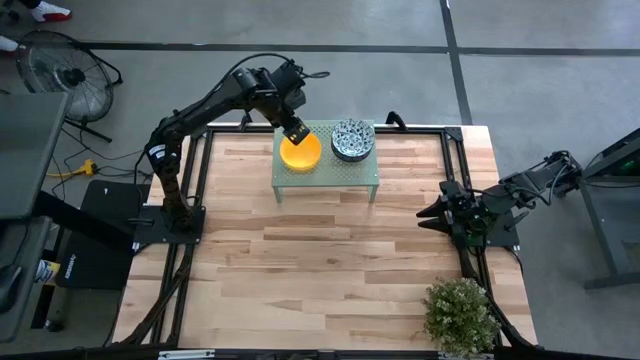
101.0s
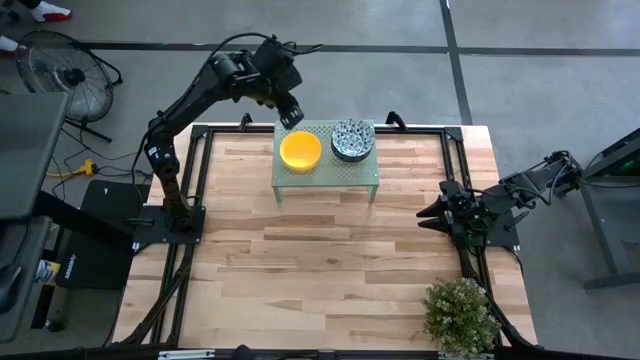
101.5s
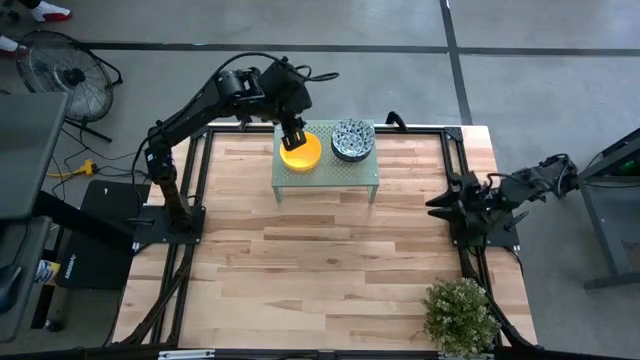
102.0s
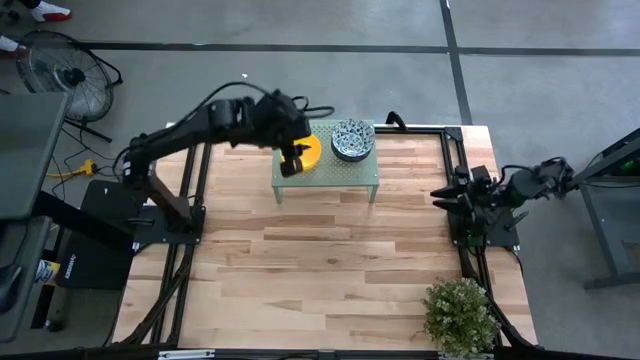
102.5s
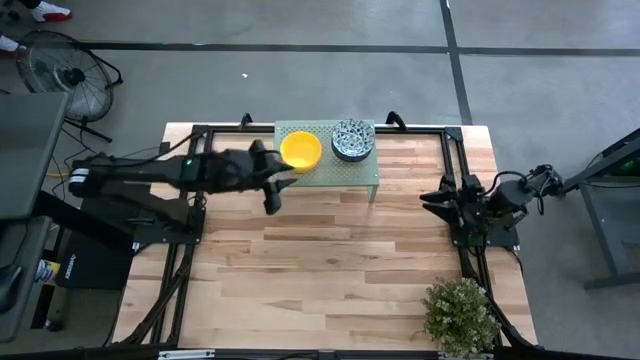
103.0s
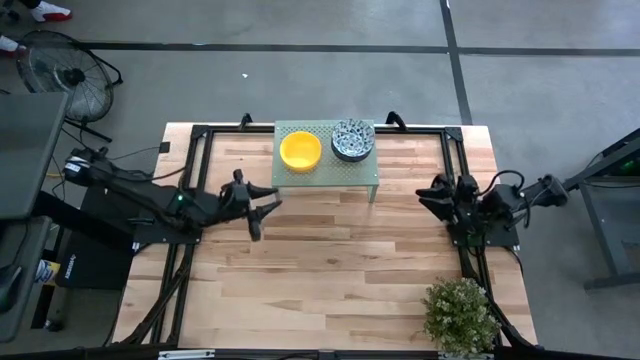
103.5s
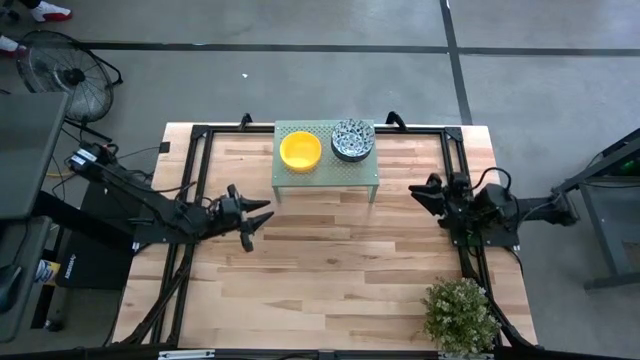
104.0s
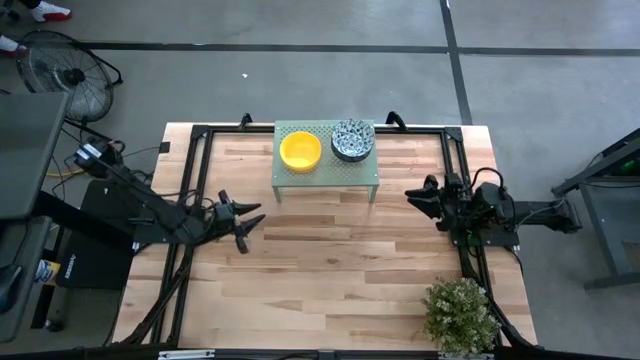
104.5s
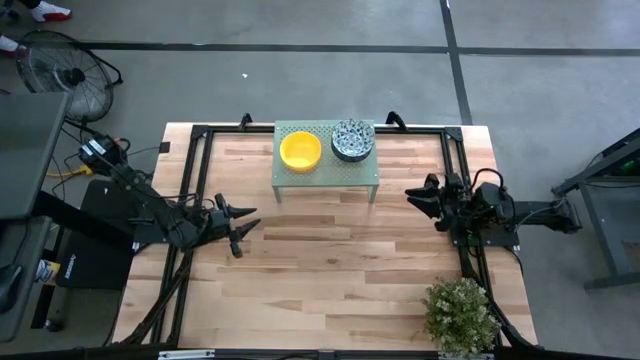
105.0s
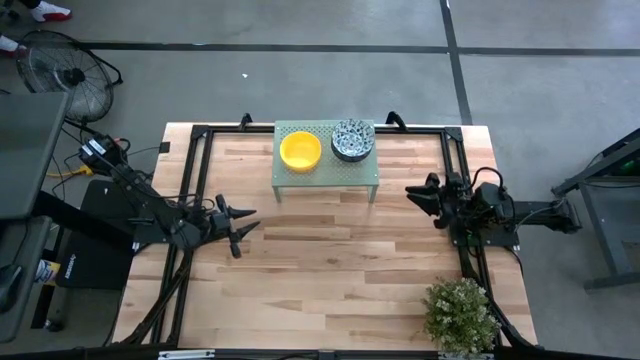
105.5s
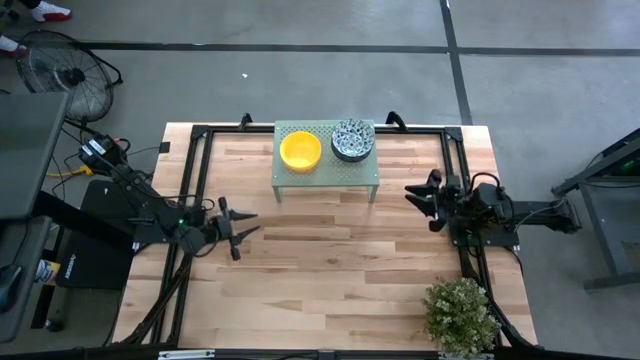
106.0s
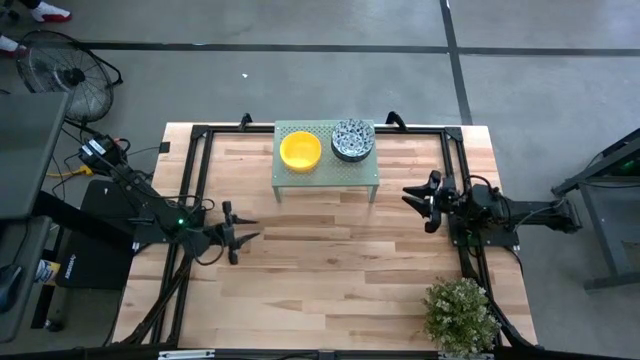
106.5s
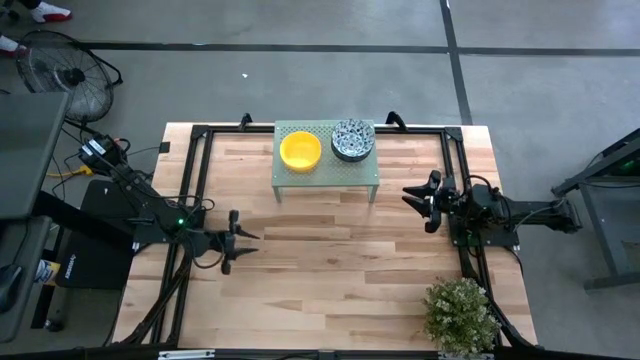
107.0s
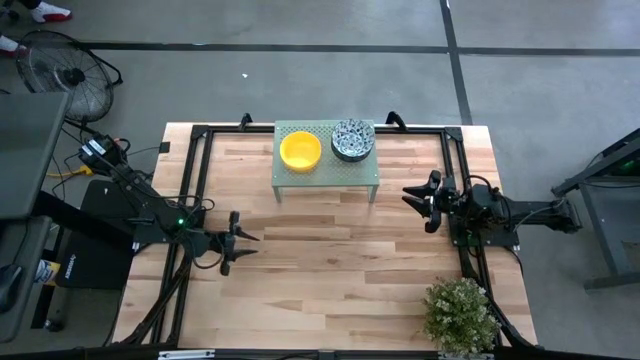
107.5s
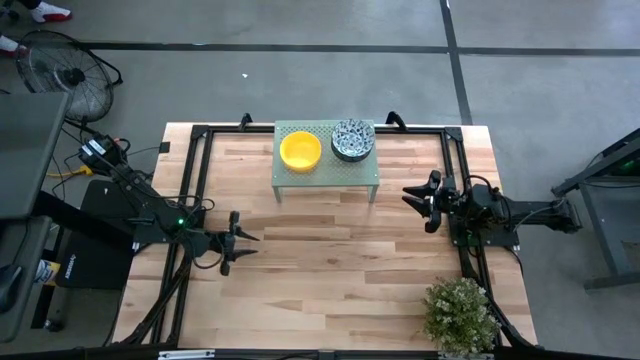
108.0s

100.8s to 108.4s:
Task: Pick & Place Mini bowls
Return to Home Position

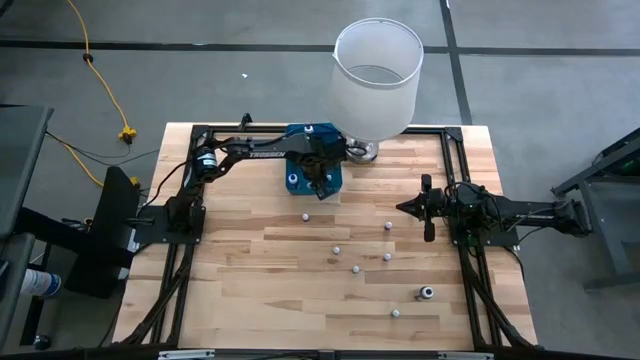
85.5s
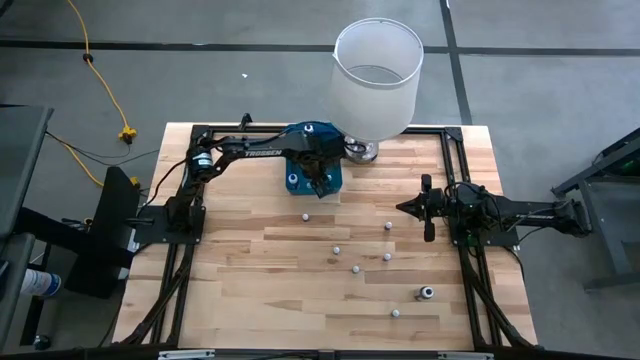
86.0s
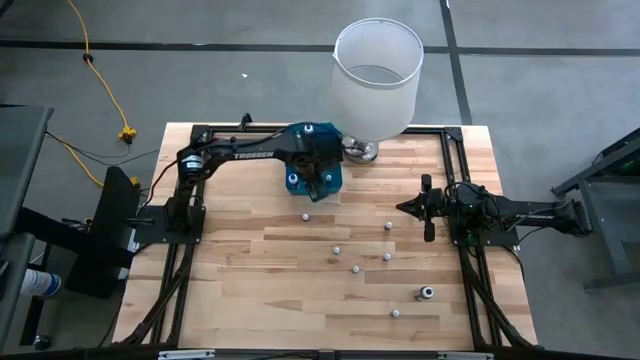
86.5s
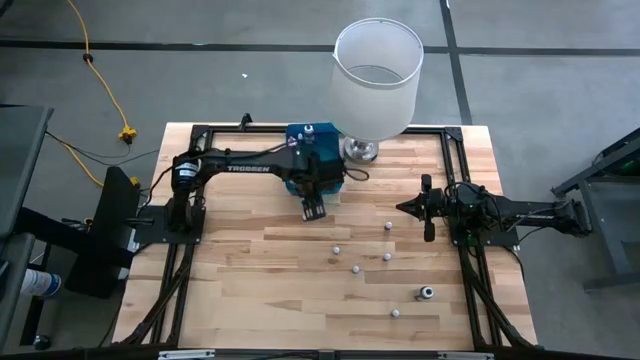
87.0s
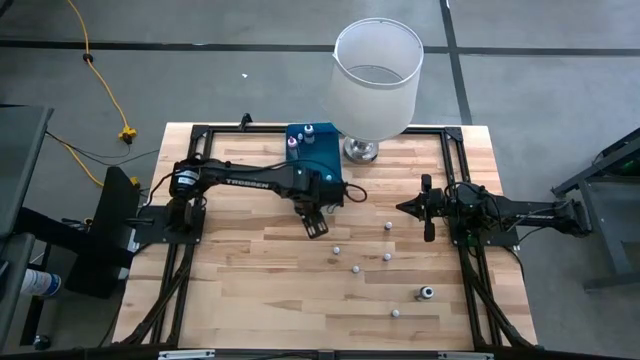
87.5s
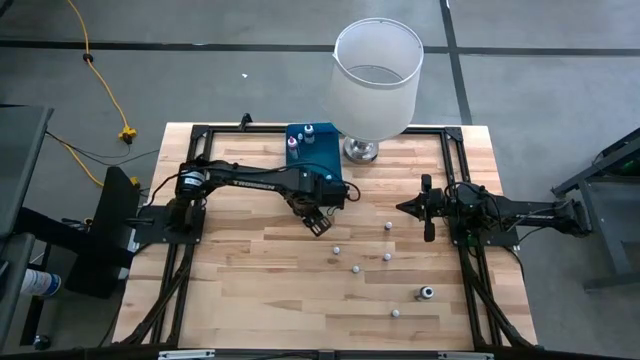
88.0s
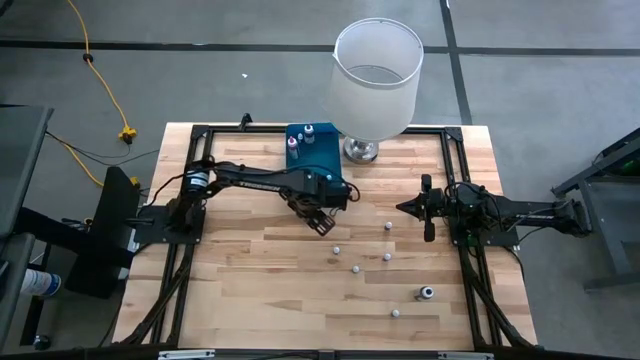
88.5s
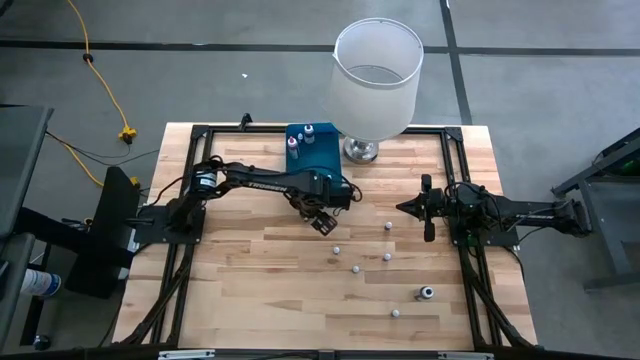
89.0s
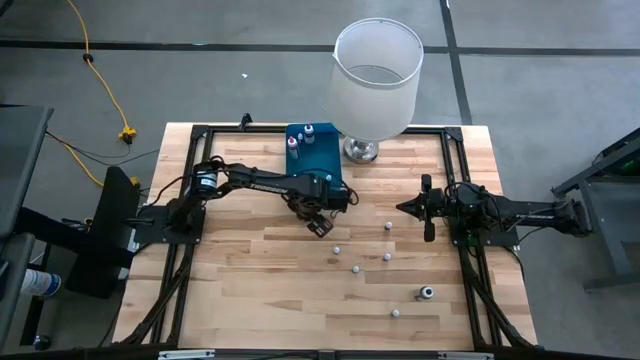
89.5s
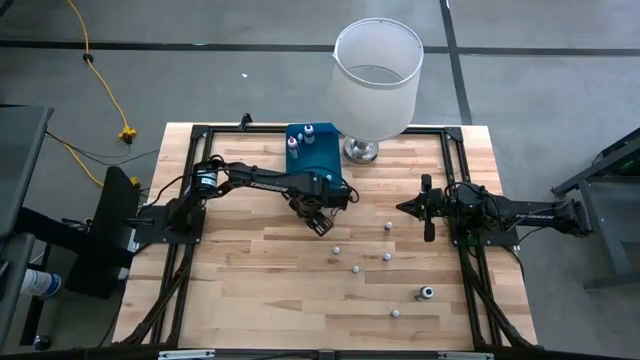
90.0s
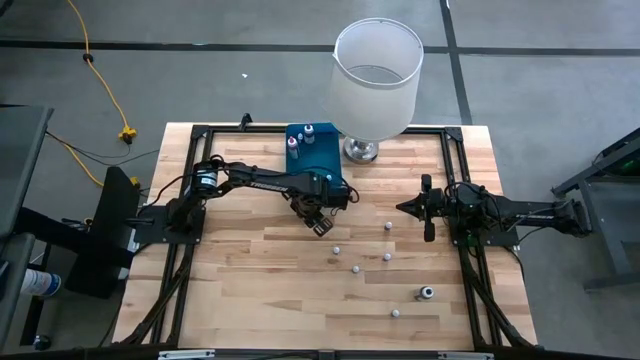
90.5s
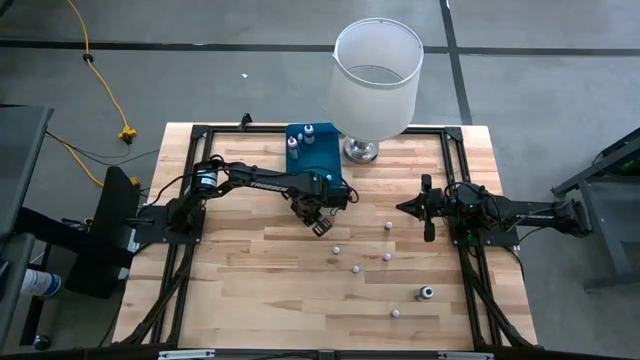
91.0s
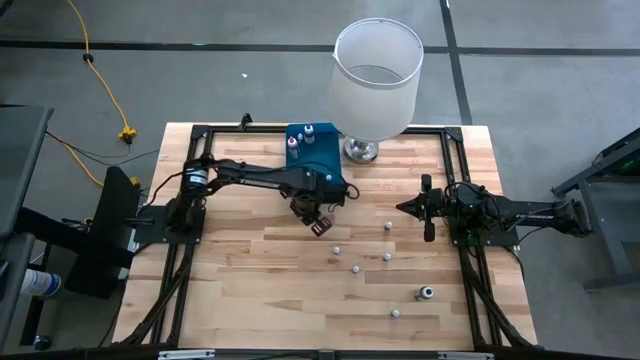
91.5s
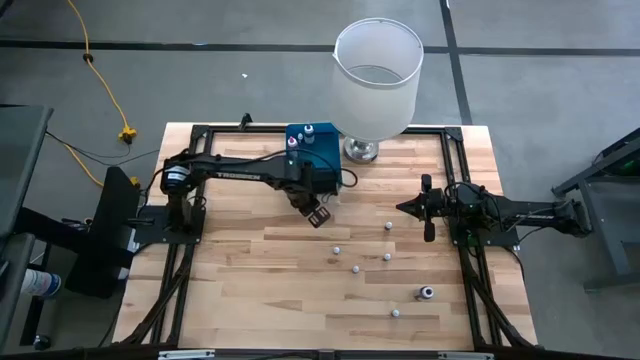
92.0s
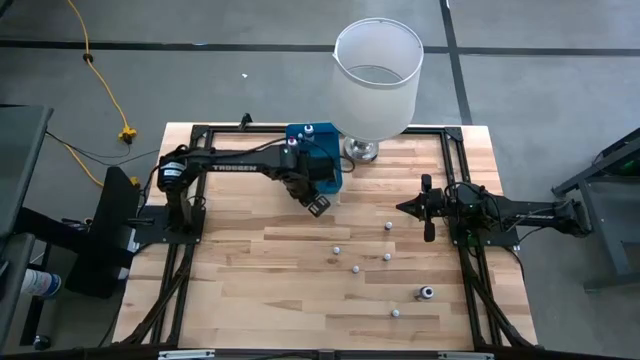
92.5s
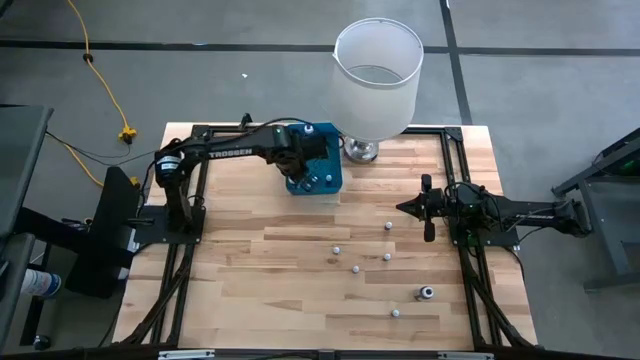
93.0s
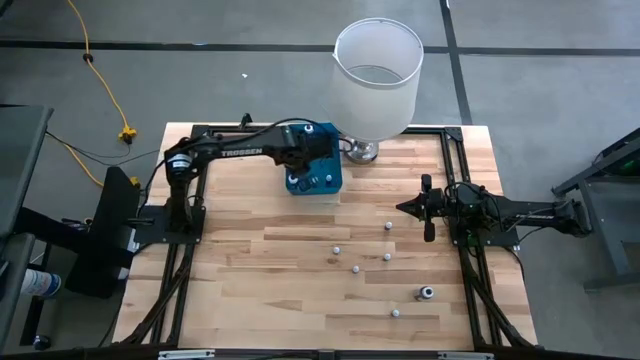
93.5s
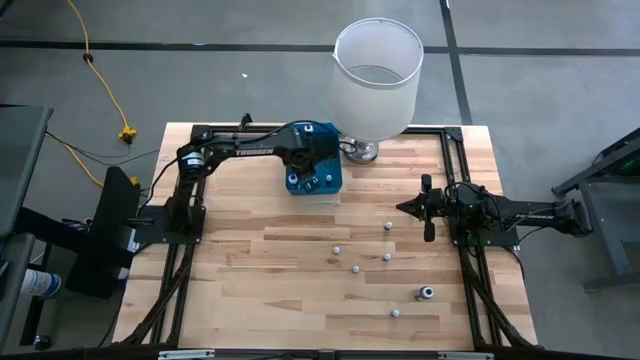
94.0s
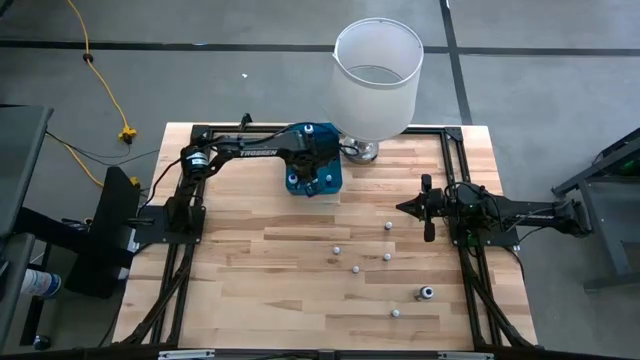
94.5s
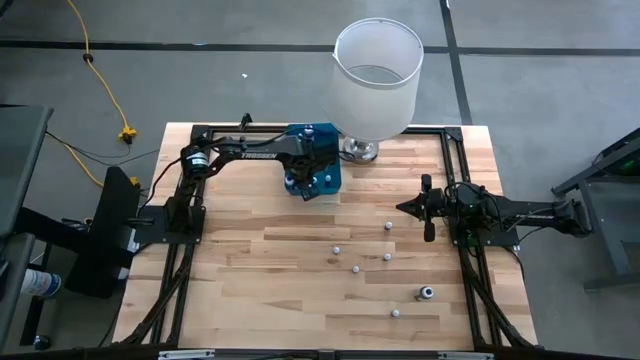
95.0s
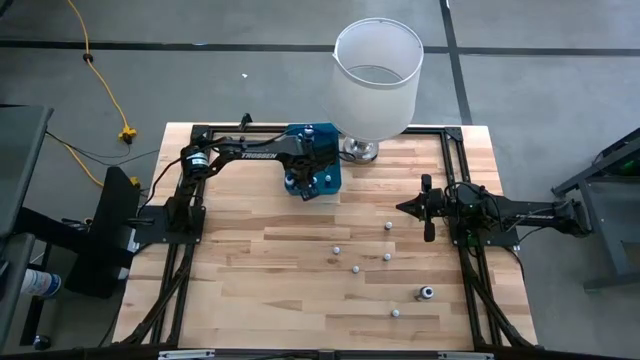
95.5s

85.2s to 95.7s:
Task: Pick & Place food coloring
Put the small black food coloring bottle into the blue bin

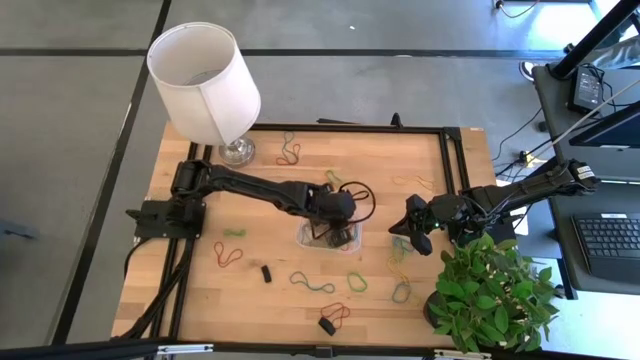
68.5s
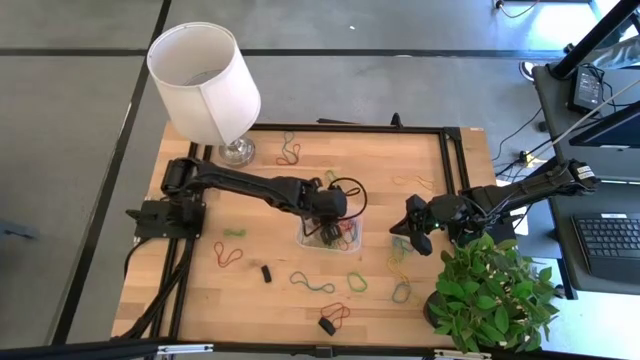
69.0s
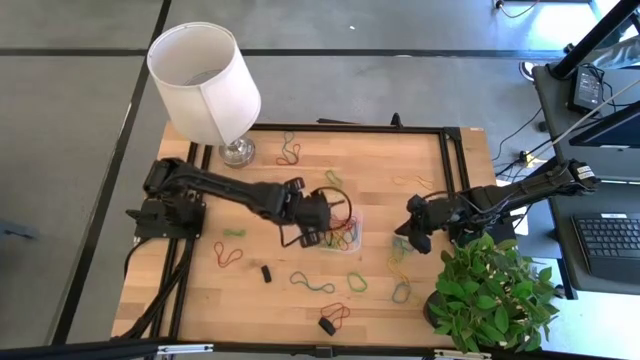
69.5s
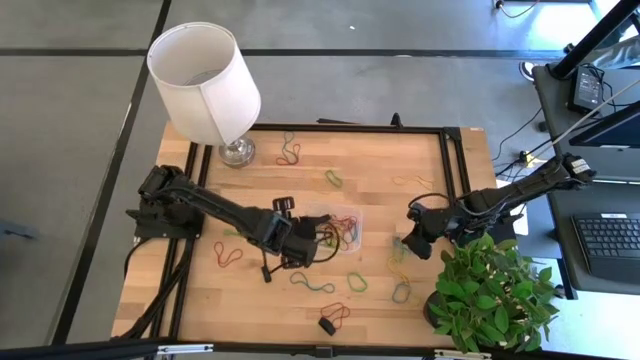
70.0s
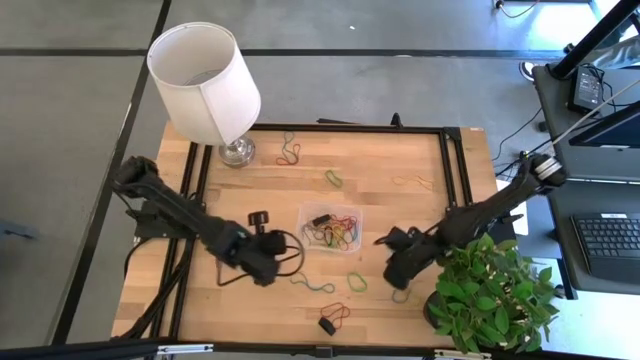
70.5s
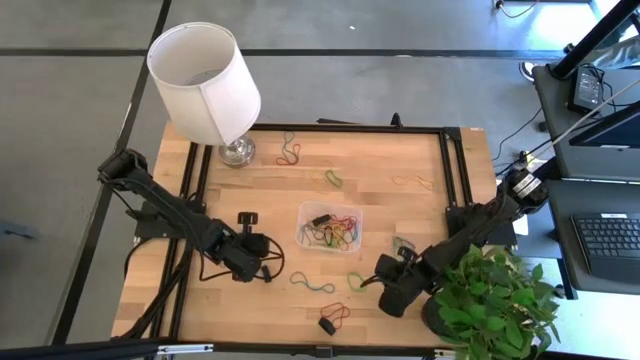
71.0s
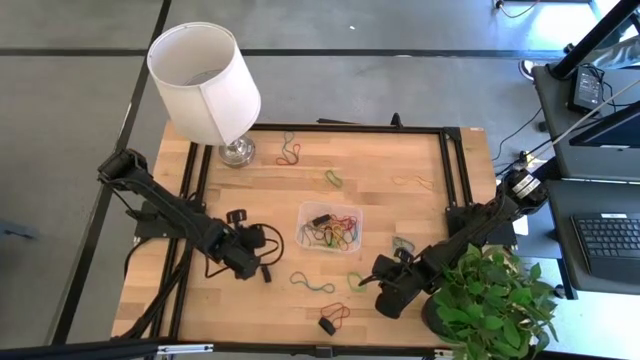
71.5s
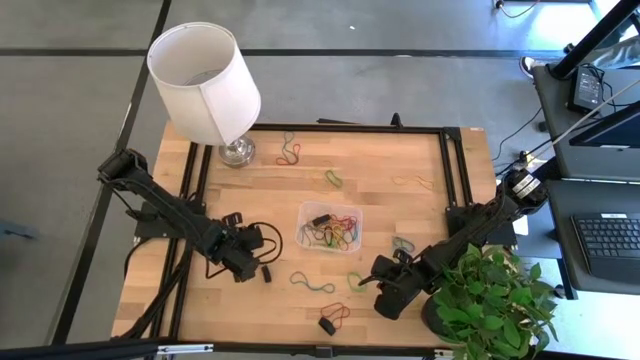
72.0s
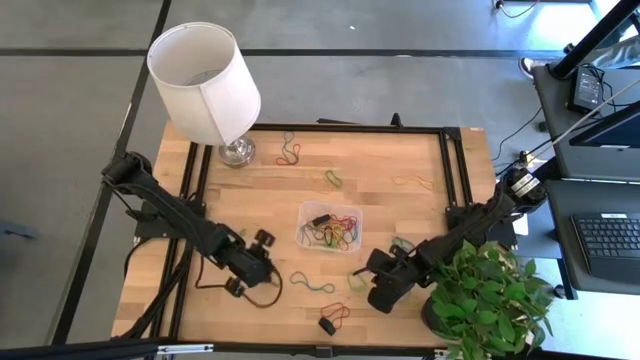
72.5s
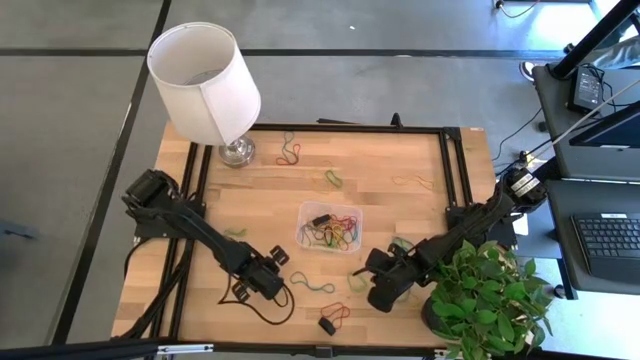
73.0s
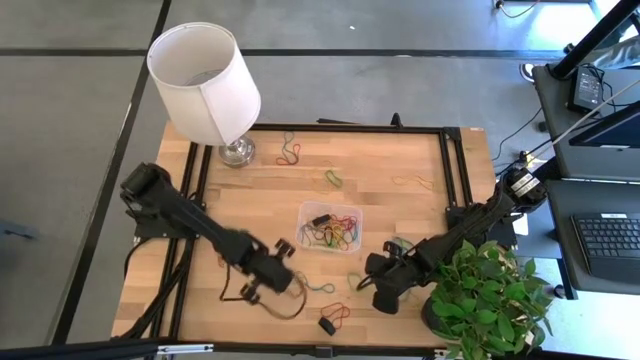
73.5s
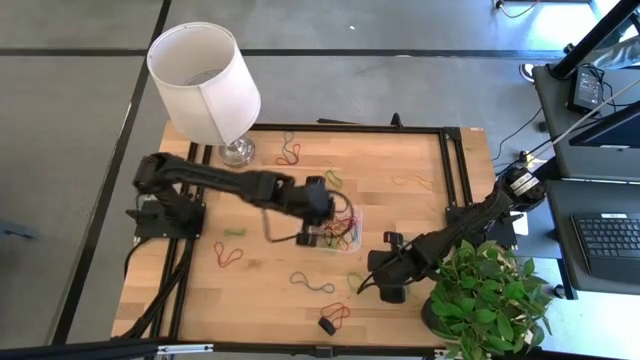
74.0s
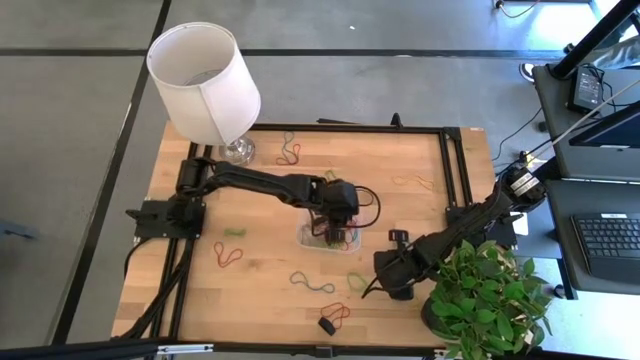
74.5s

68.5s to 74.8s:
Task: Pick and place rubber bands into bin
Put the black rubber band into the transparent bin
